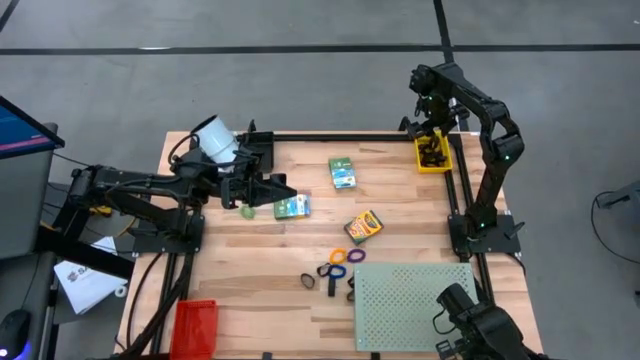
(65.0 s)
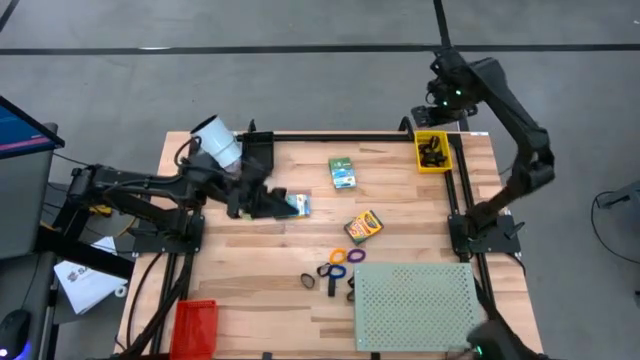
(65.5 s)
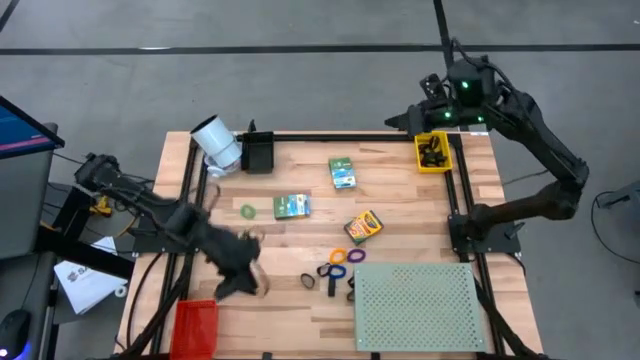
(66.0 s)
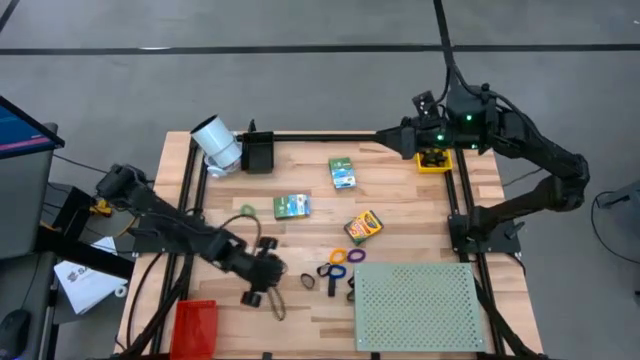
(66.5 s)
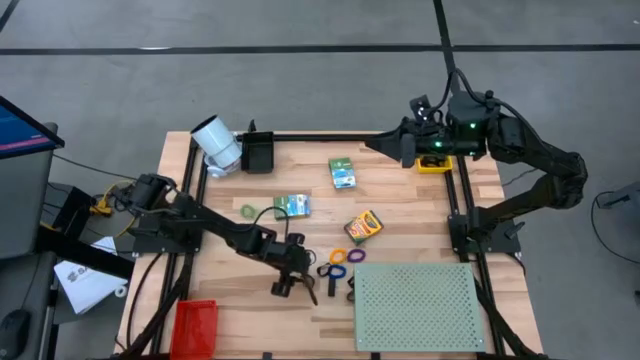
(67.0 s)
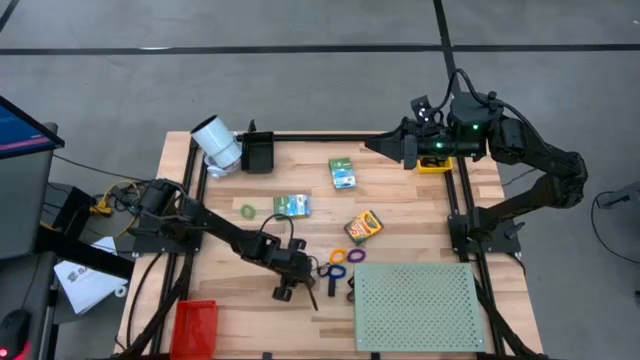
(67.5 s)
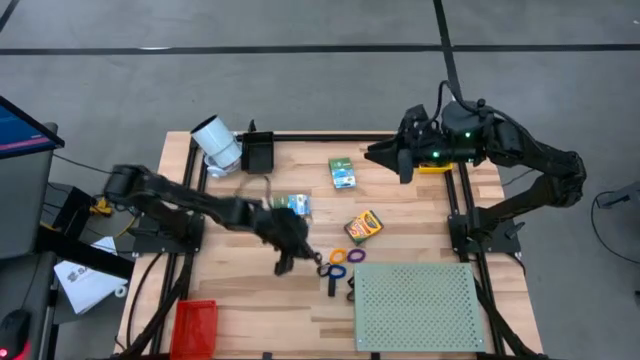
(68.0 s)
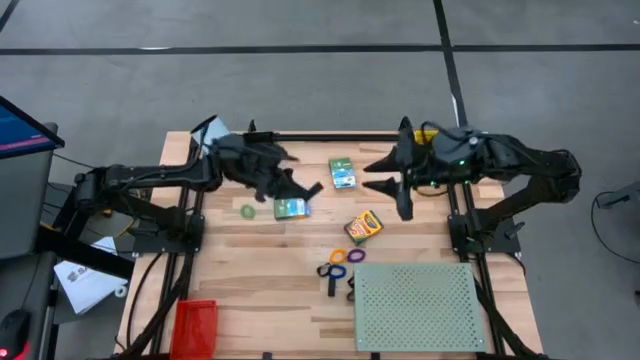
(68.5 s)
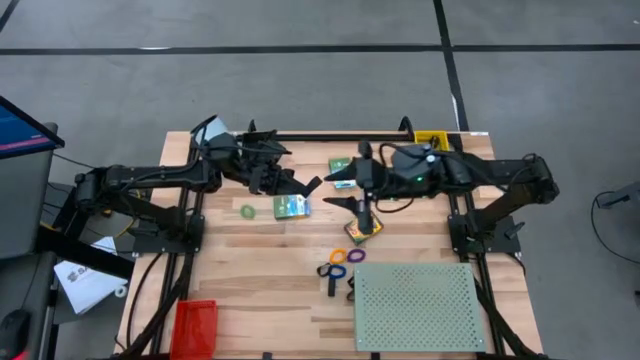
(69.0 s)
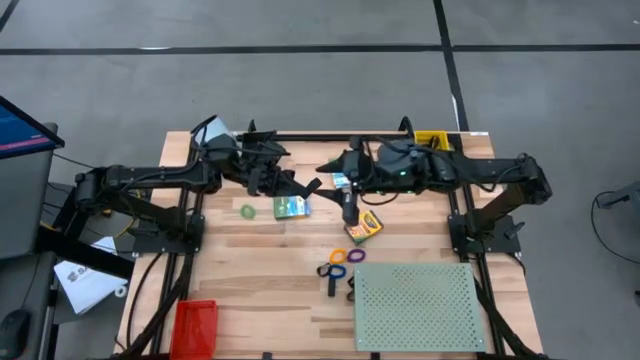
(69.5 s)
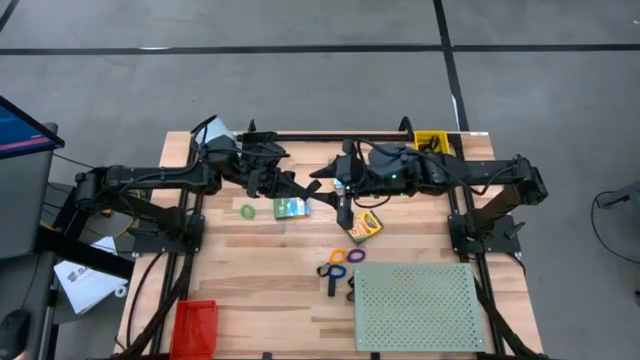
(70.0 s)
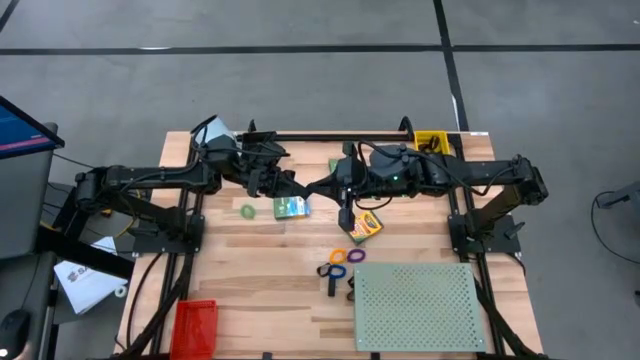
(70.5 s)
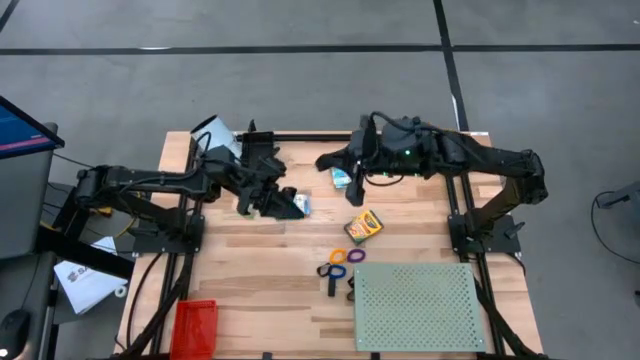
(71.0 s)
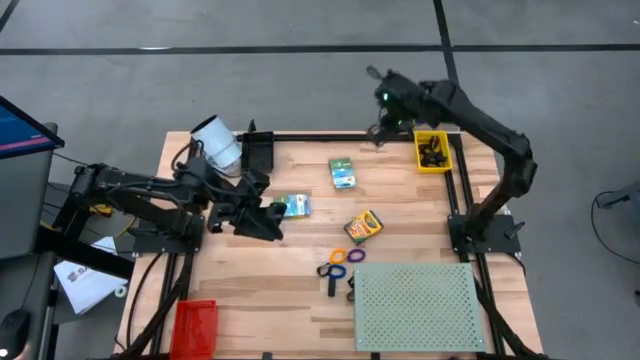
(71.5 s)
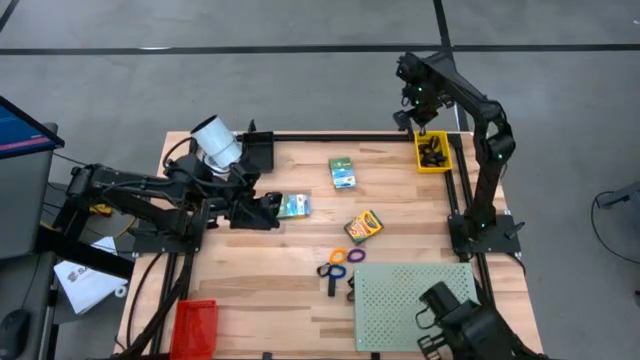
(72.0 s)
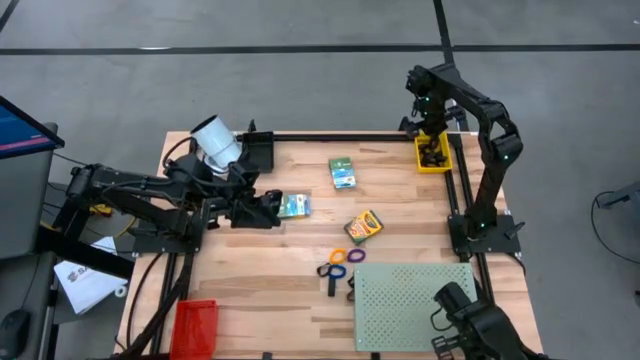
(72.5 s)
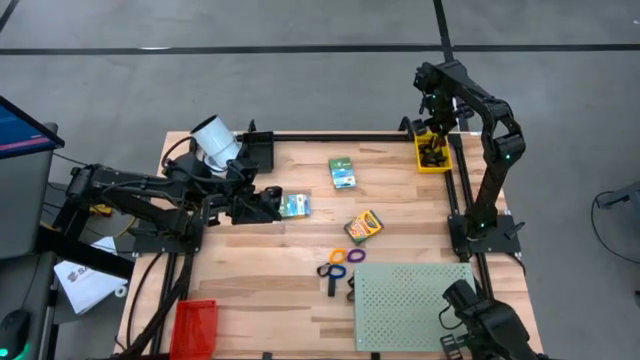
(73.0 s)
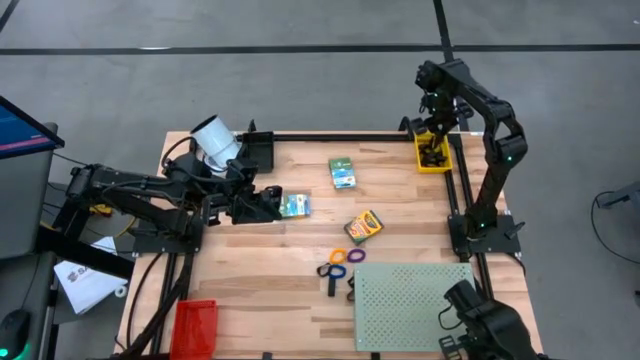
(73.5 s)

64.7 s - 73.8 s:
Task: Pick & Place Office Desk Supplies
Put the black rubber band into the yellow bin

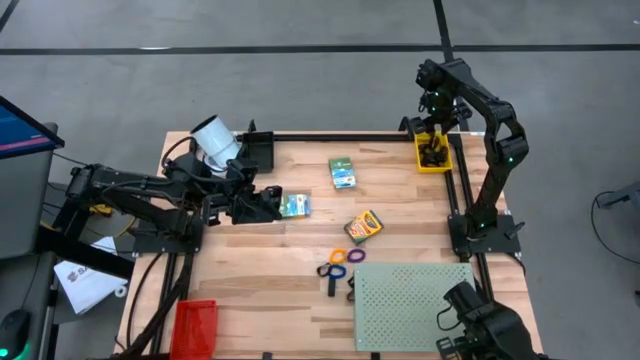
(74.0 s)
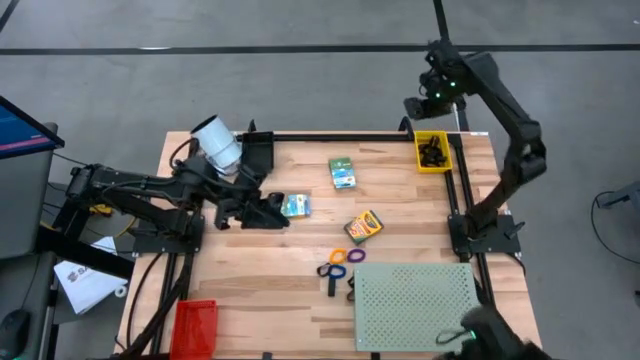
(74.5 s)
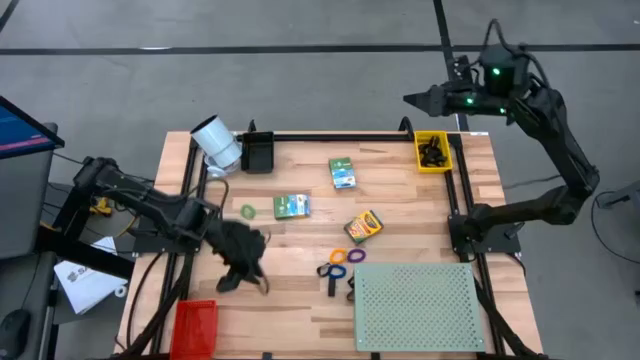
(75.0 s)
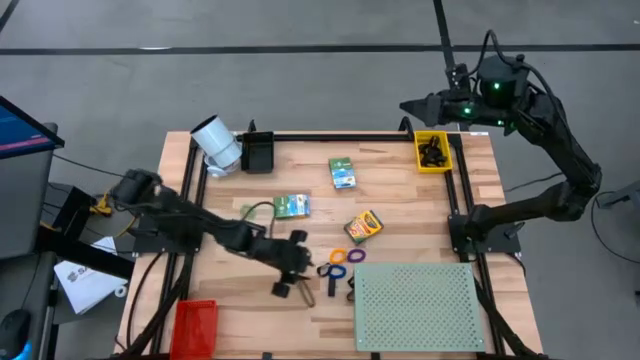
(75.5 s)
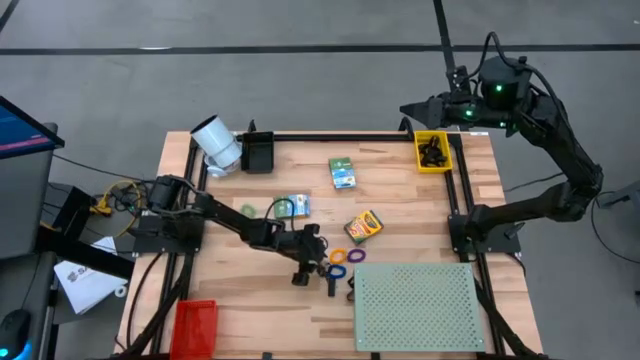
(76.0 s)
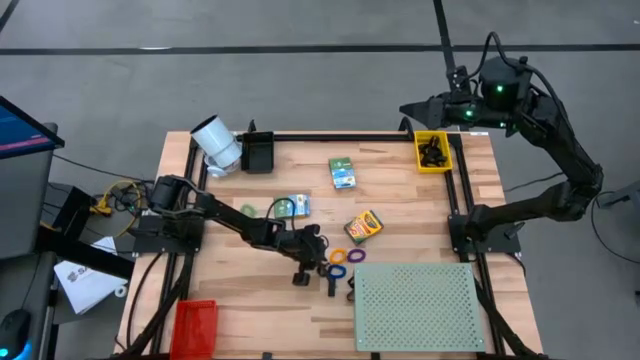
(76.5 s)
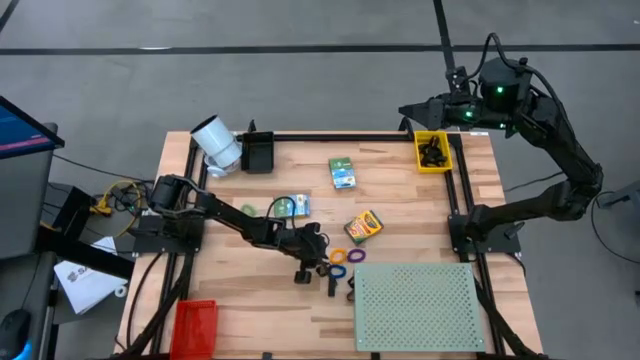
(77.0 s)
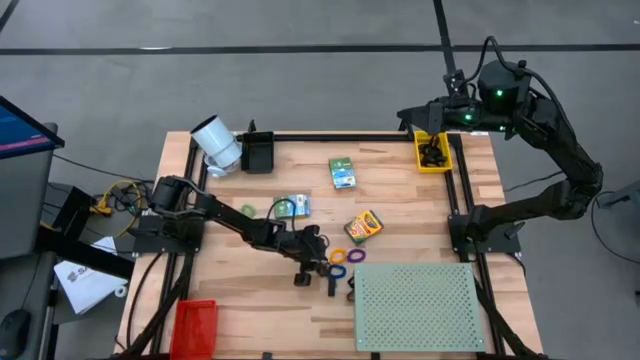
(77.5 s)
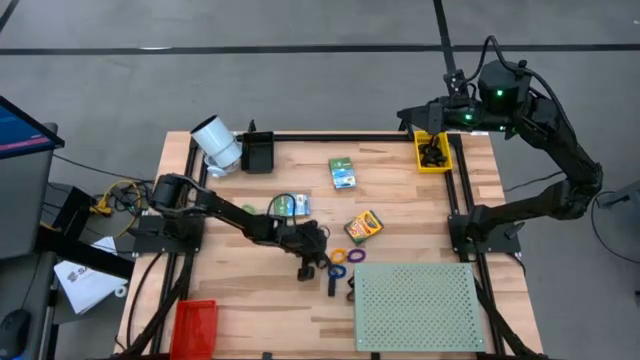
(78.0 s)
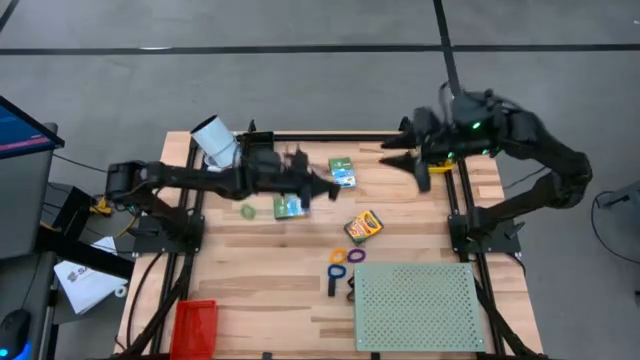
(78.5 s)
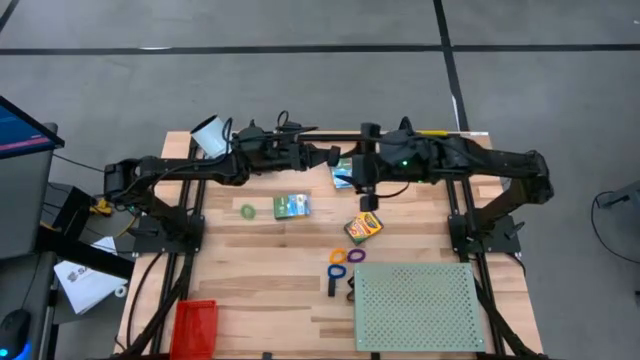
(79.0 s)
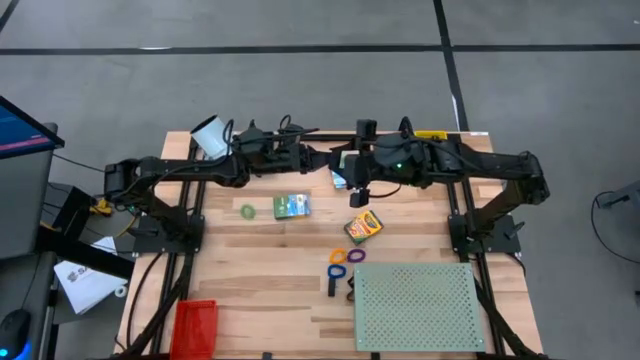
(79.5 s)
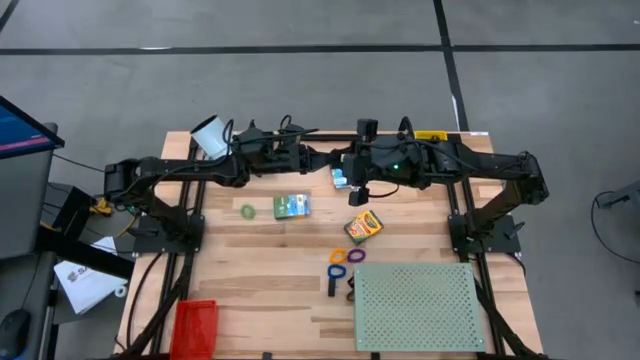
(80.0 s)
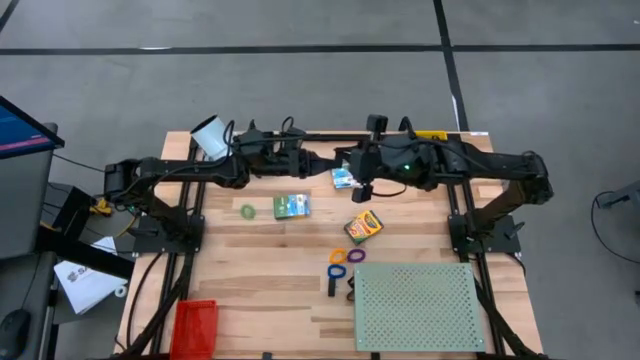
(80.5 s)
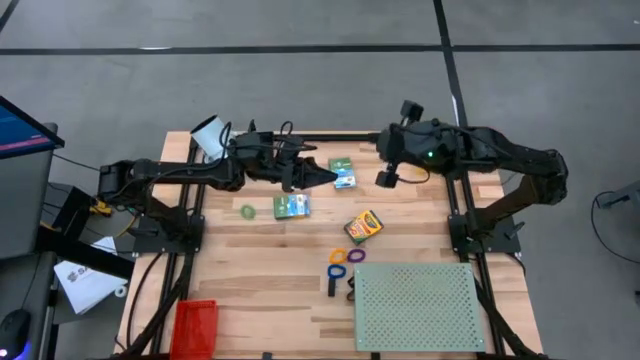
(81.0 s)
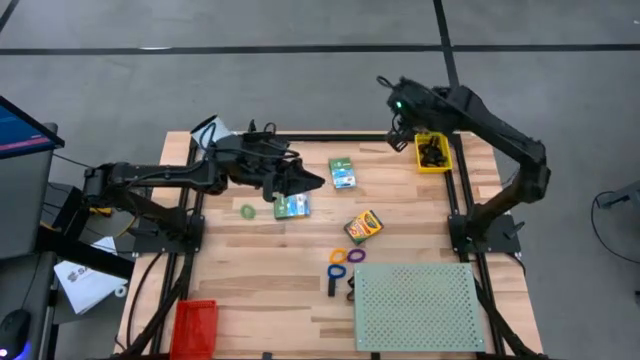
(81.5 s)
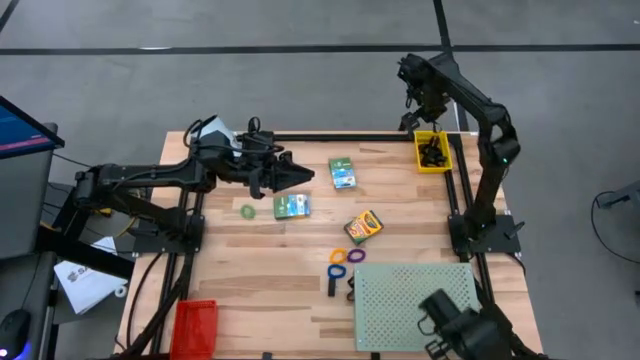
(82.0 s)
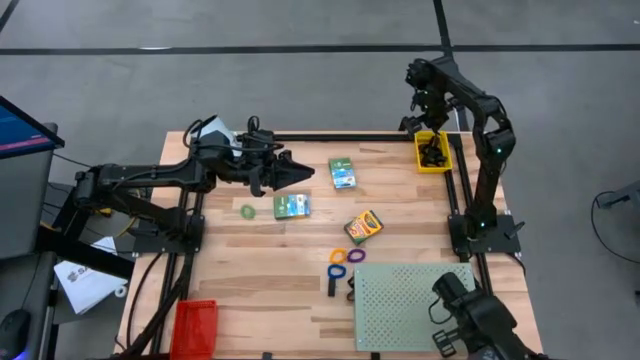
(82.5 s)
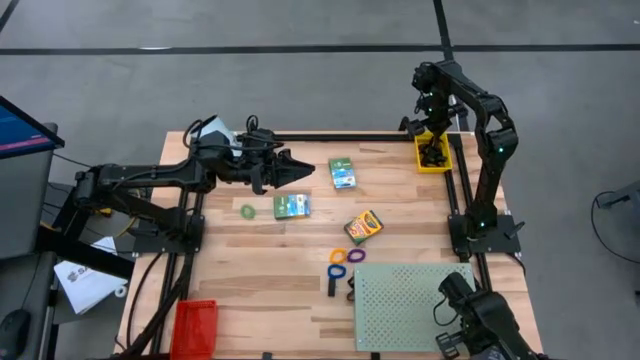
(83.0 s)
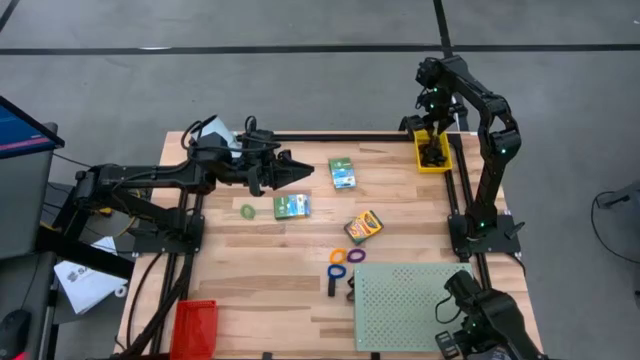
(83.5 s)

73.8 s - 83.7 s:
Put the black rubber band into the yellow bin

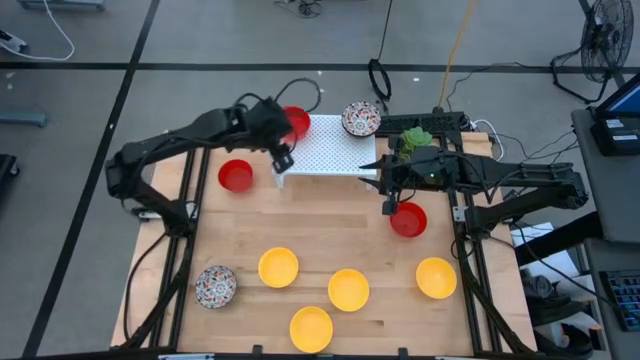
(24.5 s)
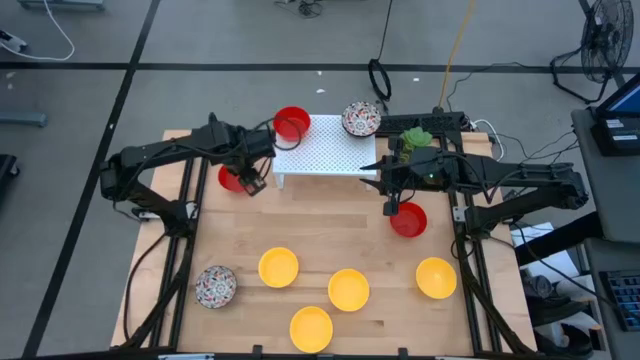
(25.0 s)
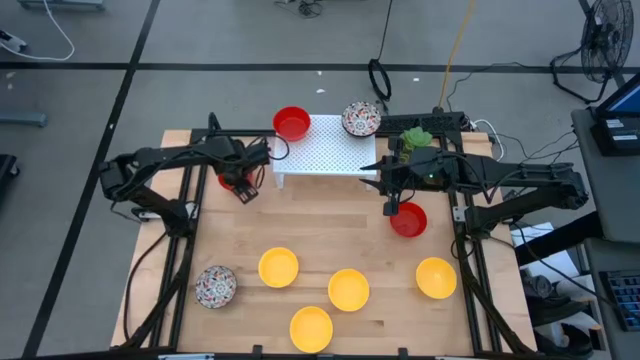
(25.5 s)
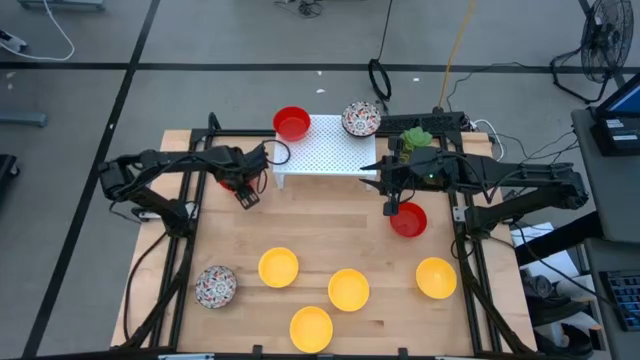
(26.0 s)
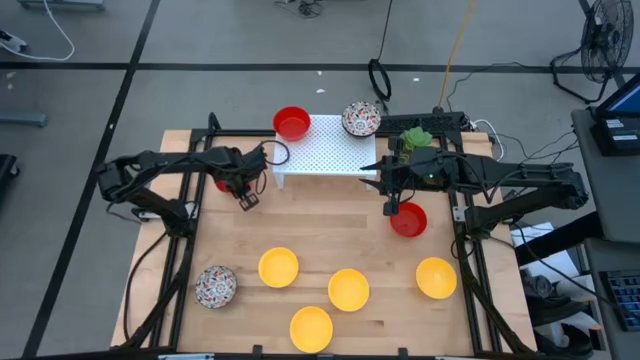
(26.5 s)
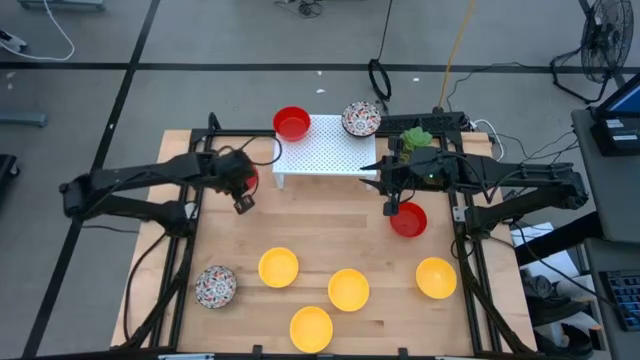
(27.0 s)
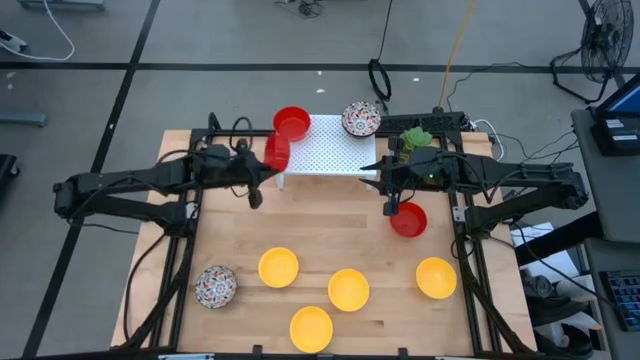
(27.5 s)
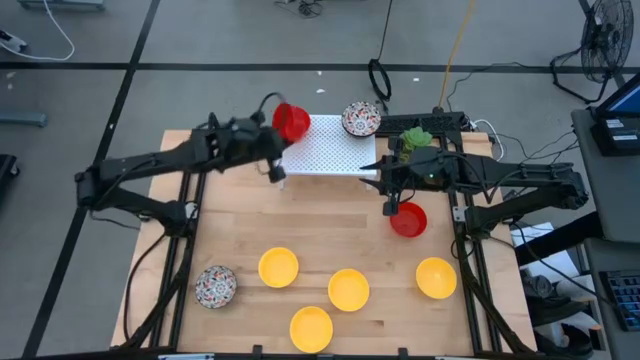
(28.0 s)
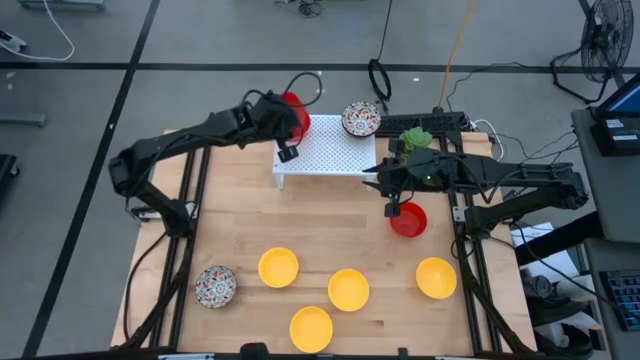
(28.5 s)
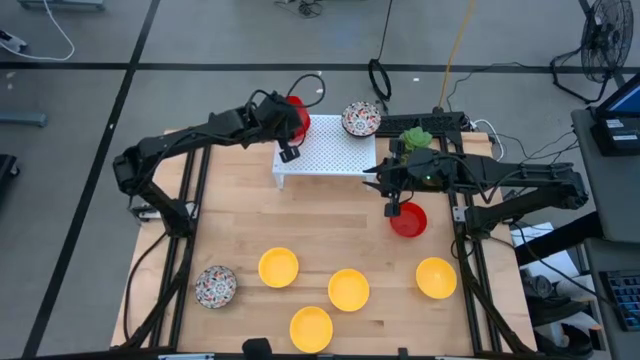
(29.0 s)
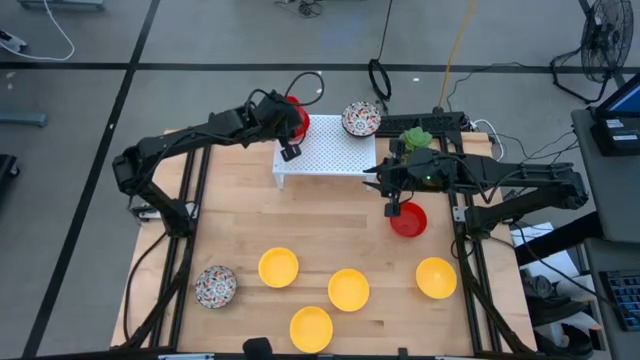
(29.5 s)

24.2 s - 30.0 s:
Task: Pick & Place Mini bowls
Stack the red bowl on the other red bowl on the shelf
